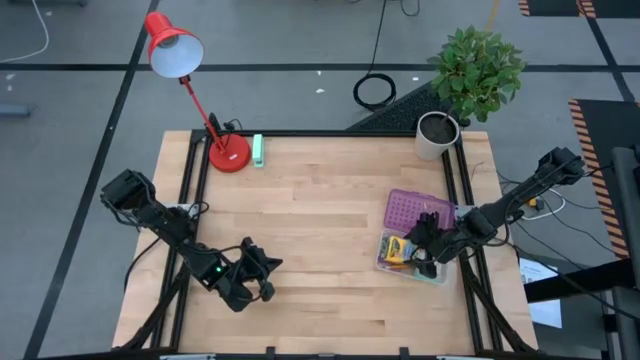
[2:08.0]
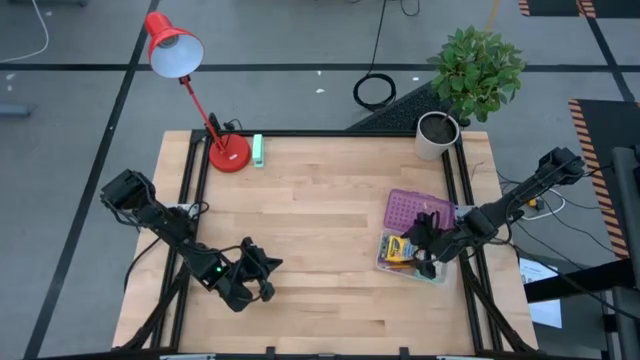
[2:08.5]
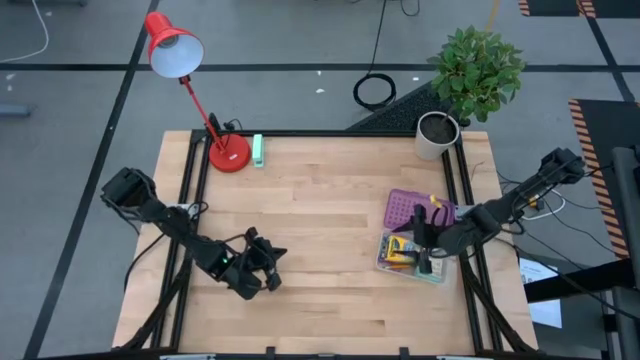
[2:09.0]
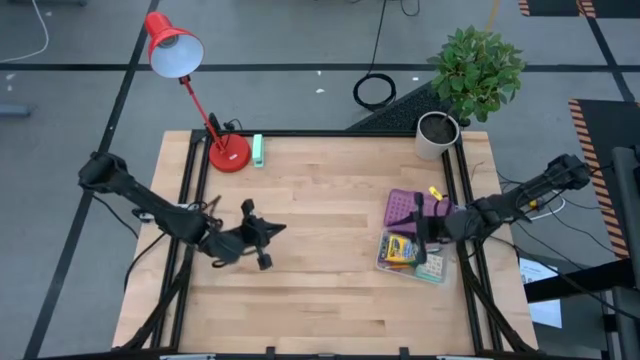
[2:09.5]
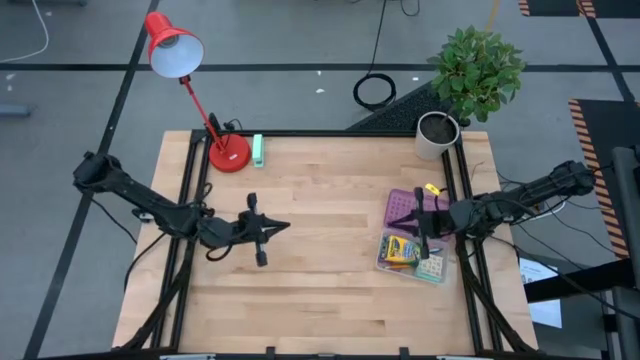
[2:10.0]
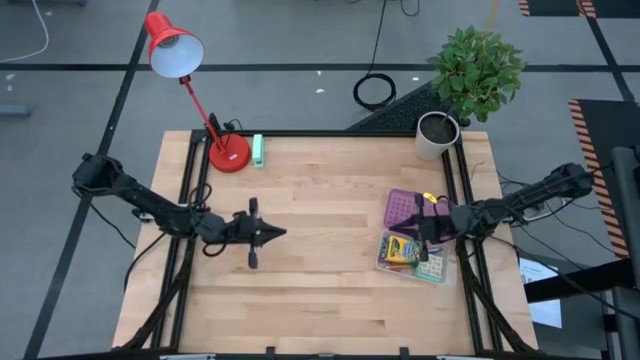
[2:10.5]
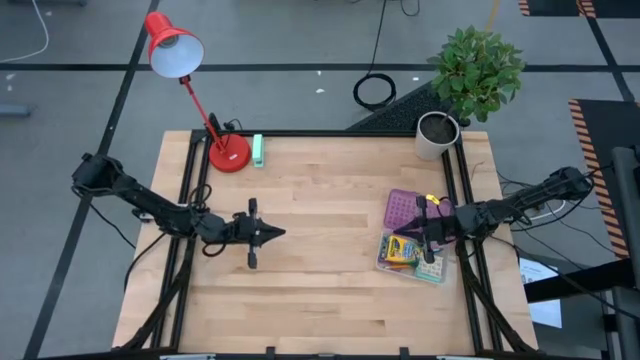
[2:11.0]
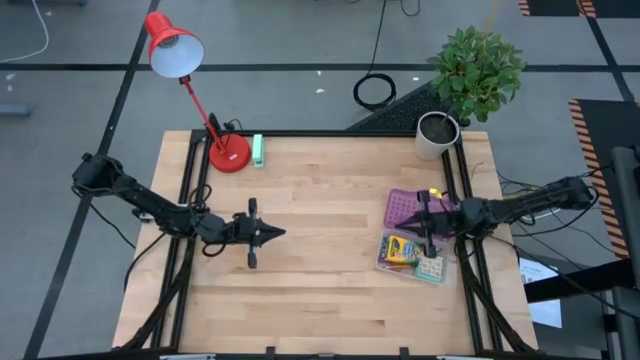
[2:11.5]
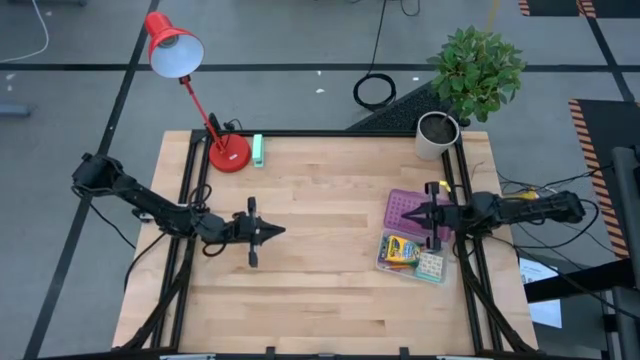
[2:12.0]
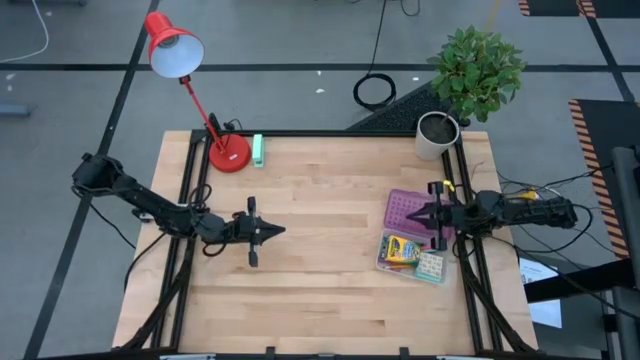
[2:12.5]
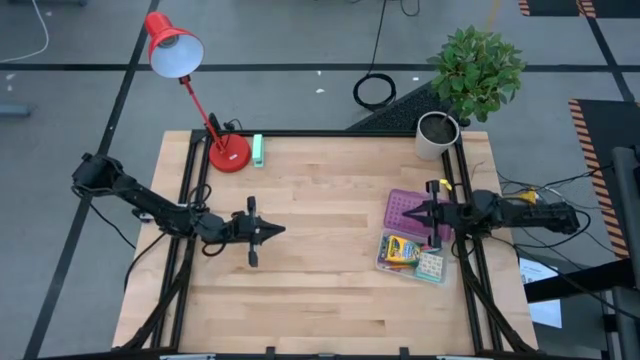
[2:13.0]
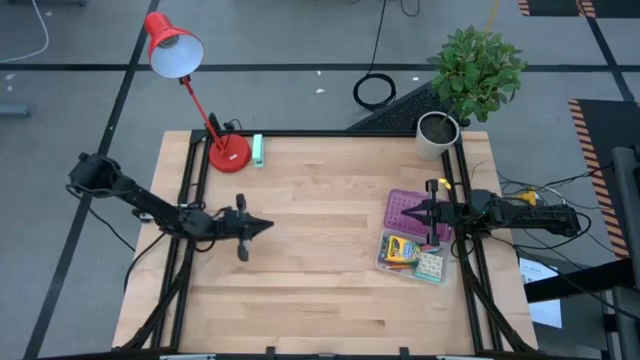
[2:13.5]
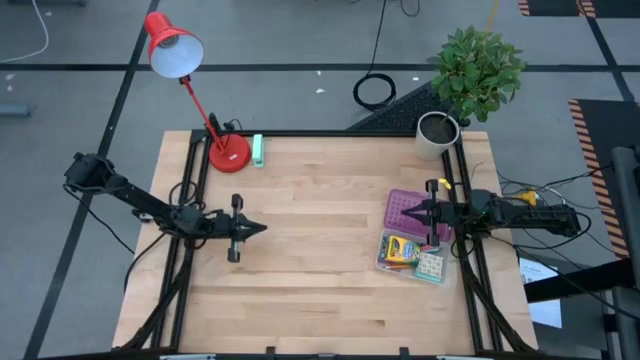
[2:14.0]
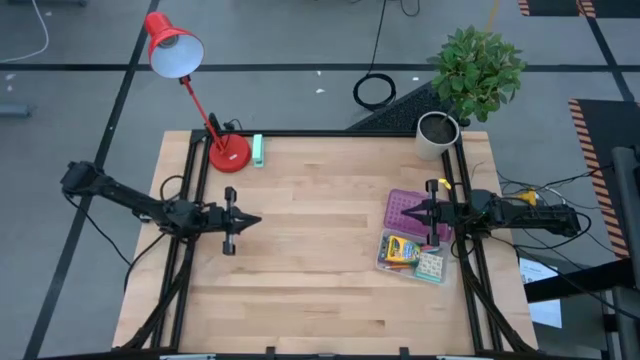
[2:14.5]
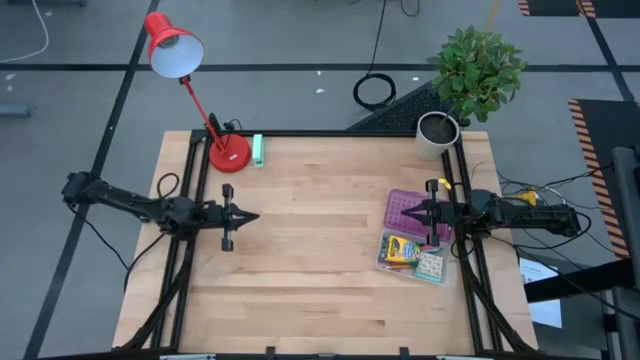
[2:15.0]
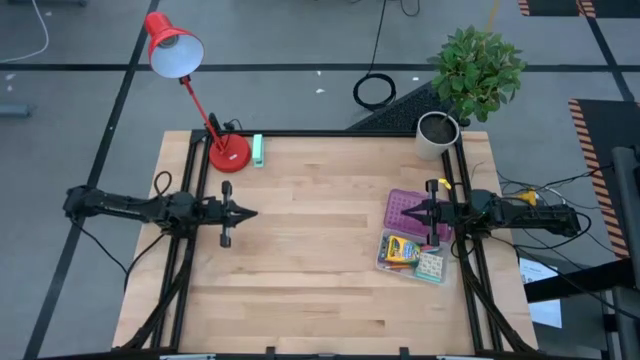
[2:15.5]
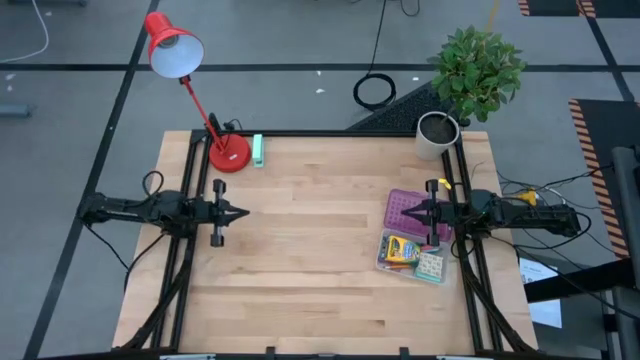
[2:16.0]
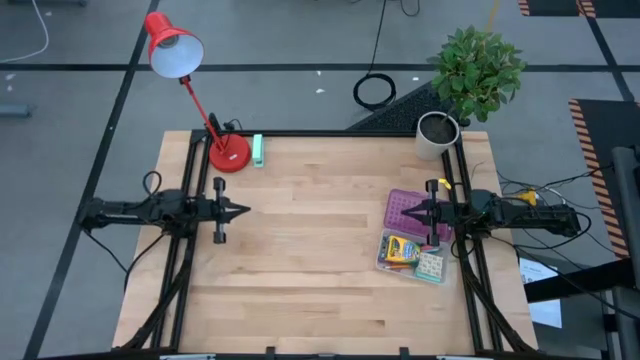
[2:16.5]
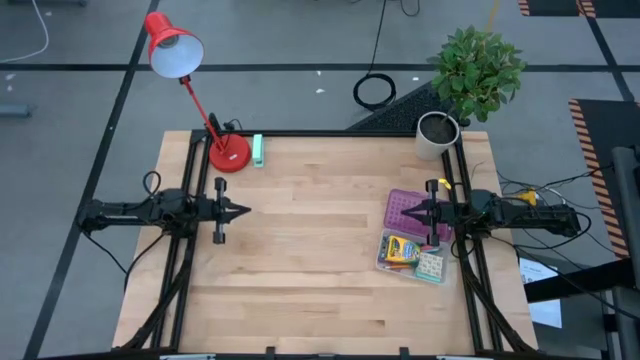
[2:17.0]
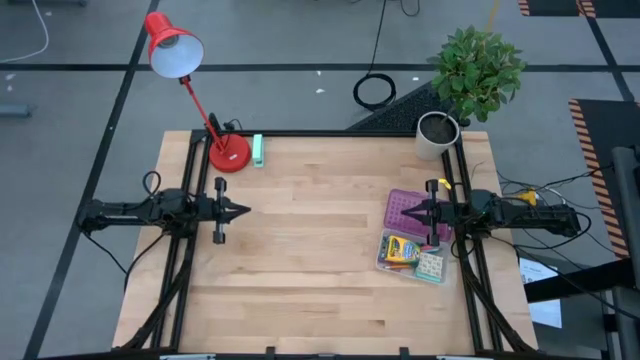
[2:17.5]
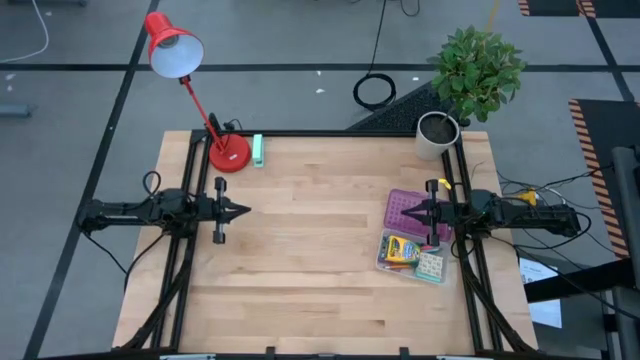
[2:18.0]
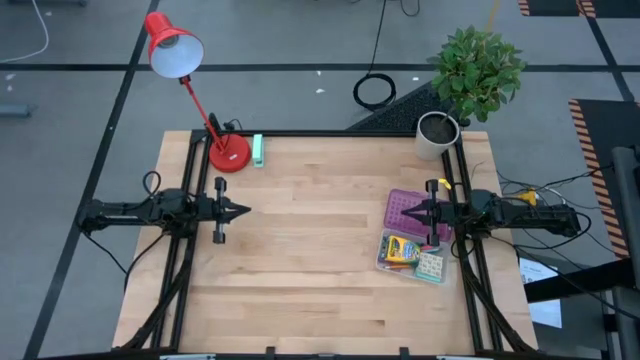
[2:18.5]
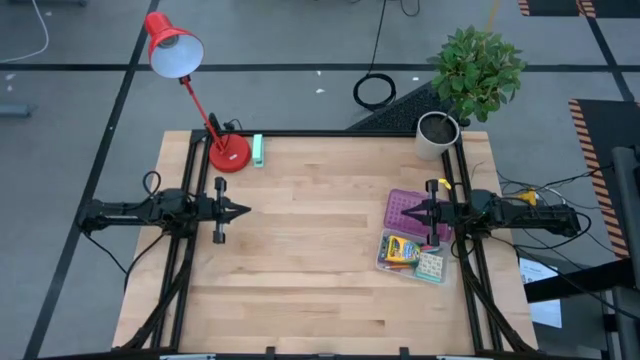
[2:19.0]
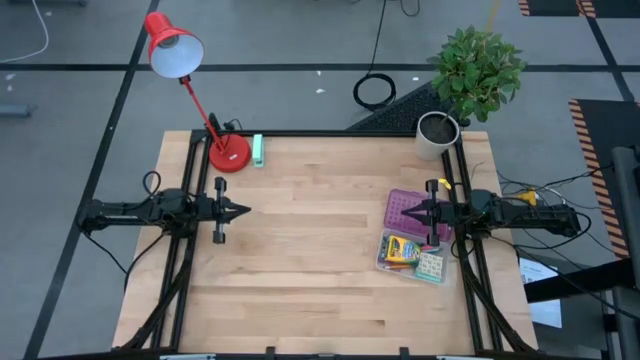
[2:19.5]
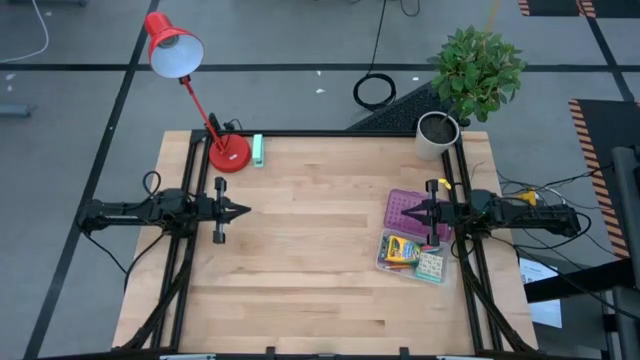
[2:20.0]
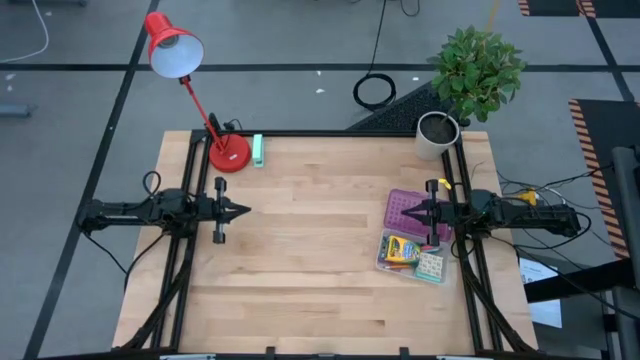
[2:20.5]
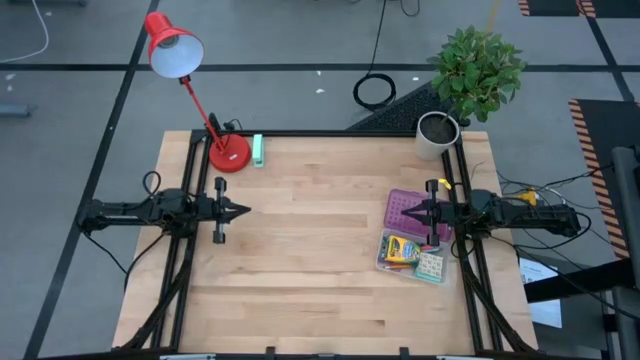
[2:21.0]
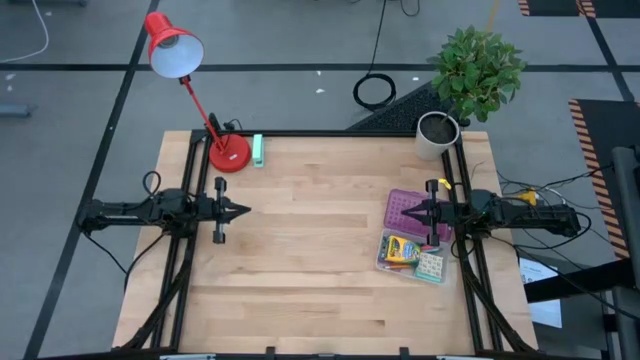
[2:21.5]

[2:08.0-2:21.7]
Task: Pack school essentials
Return to Home Position

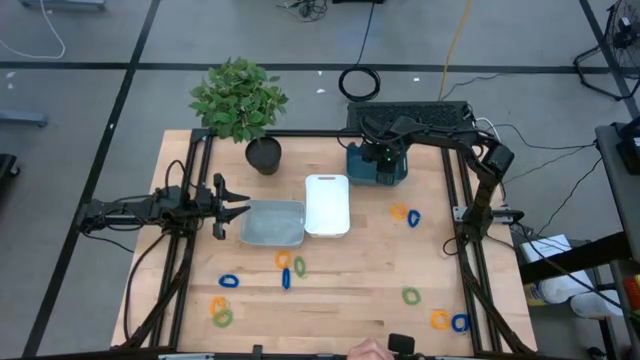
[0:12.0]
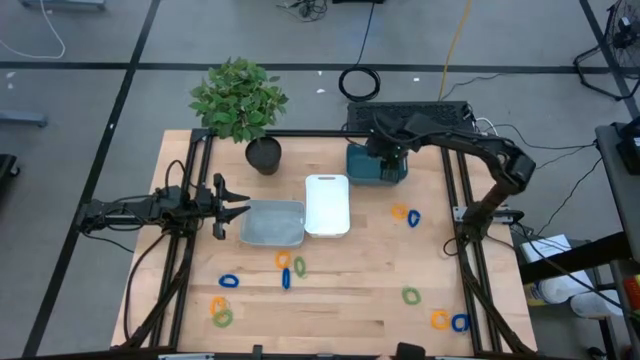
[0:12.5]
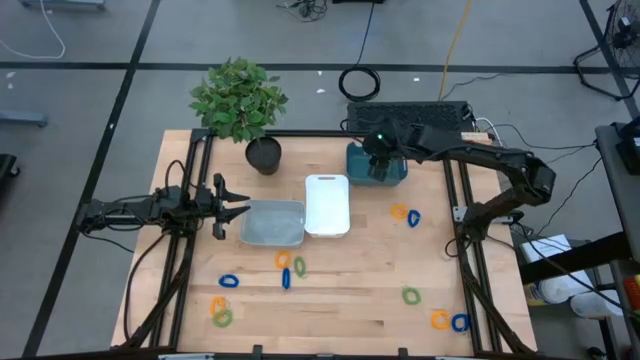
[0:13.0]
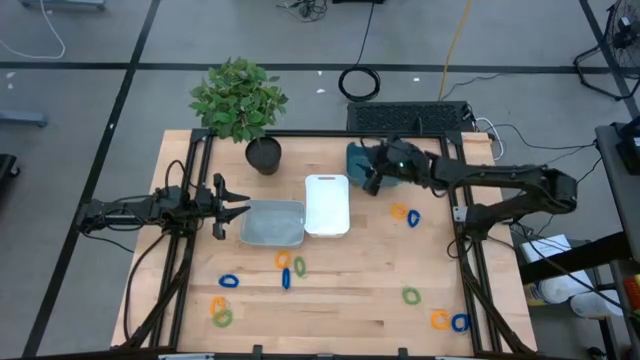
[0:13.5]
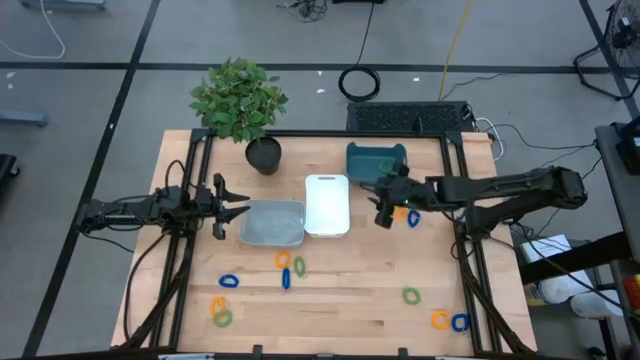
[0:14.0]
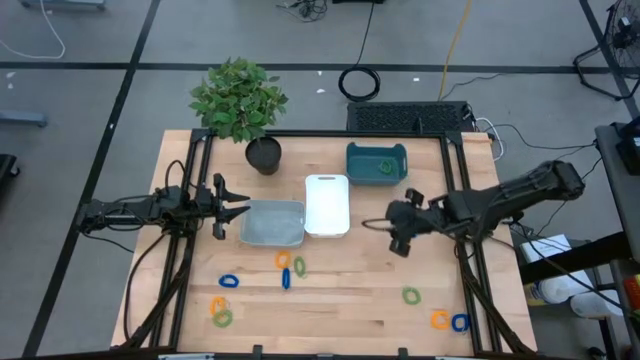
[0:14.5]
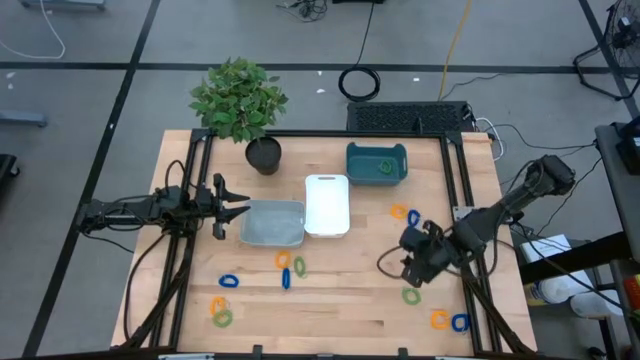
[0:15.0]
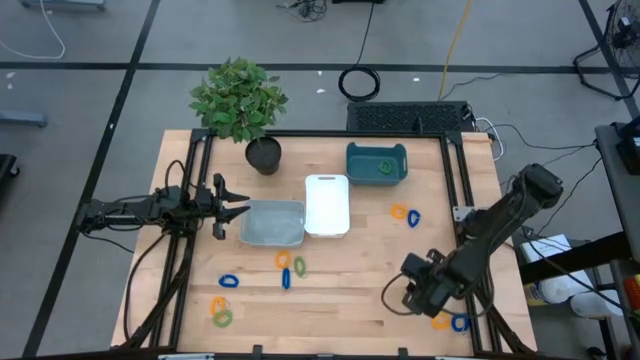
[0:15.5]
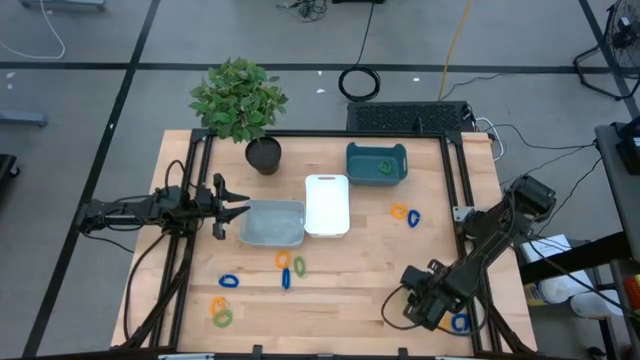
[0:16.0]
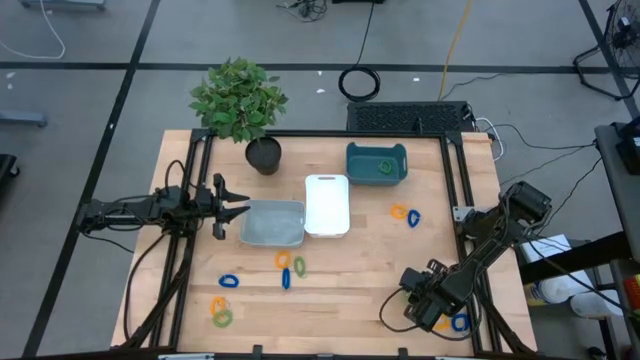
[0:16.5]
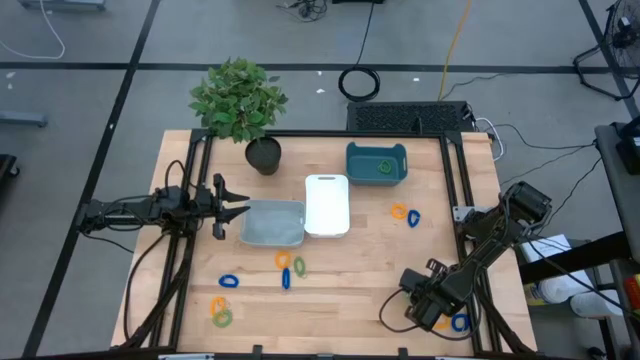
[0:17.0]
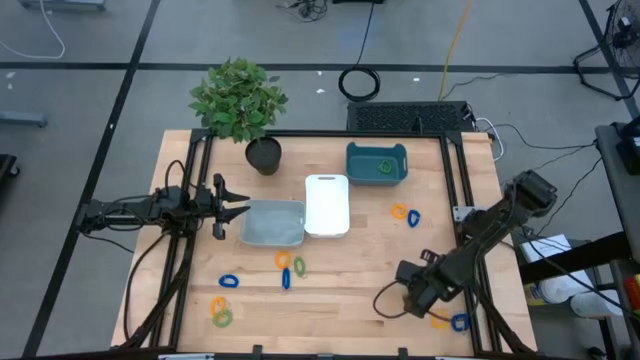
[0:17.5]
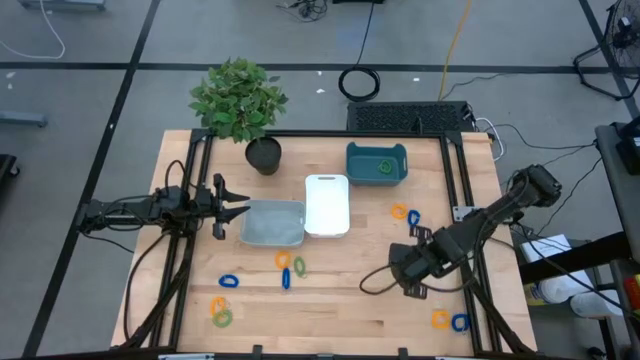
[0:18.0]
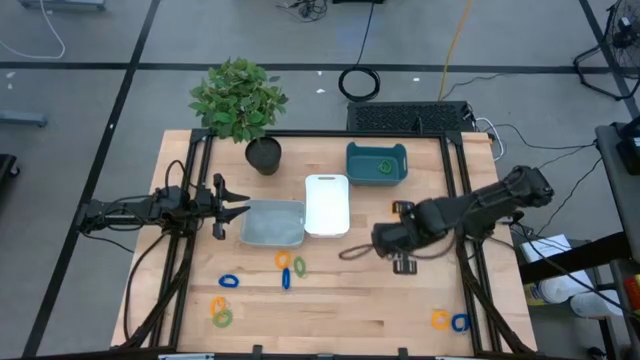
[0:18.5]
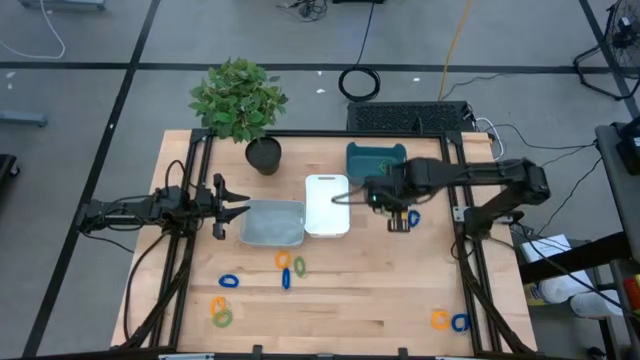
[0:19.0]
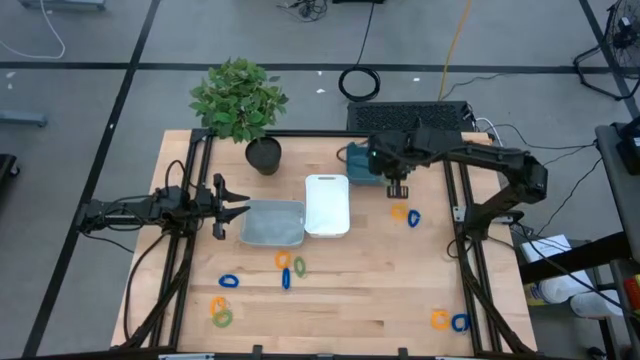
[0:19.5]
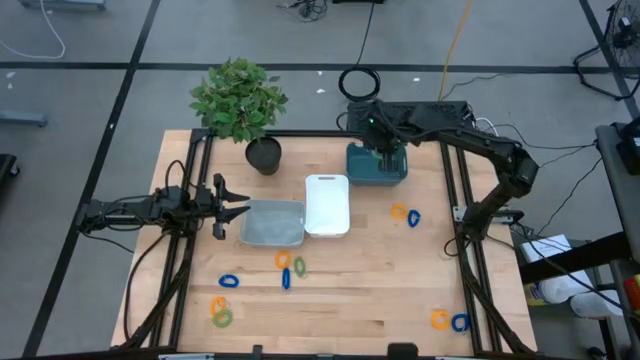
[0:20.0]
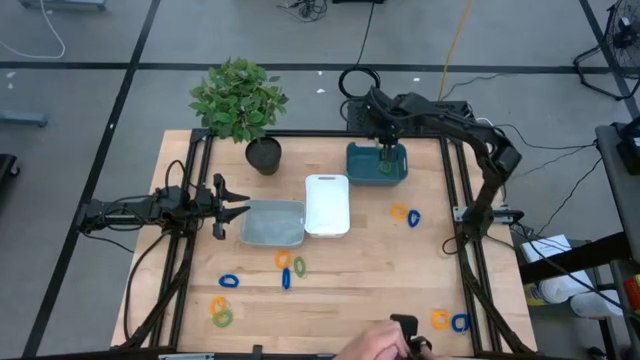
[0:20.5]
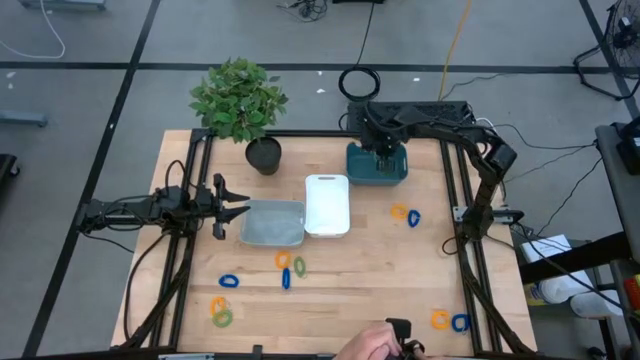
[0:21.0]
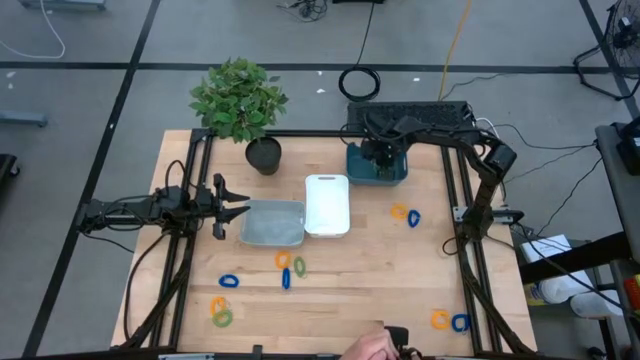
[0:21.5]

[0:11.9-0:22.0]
Task: Sort spring keychains
Put the green spring keychain into the blue bin
